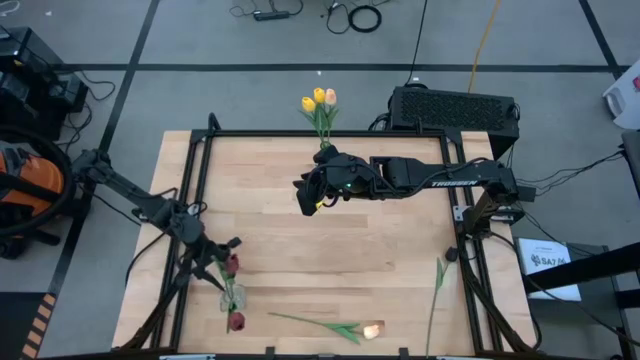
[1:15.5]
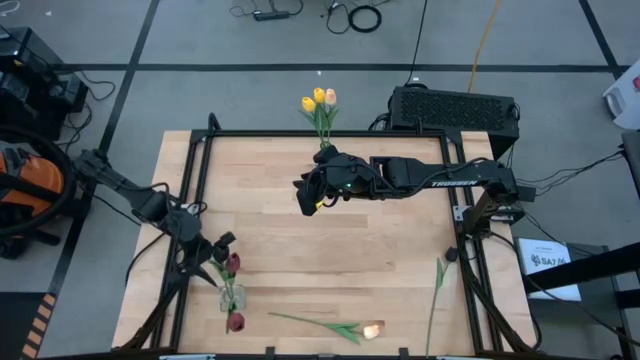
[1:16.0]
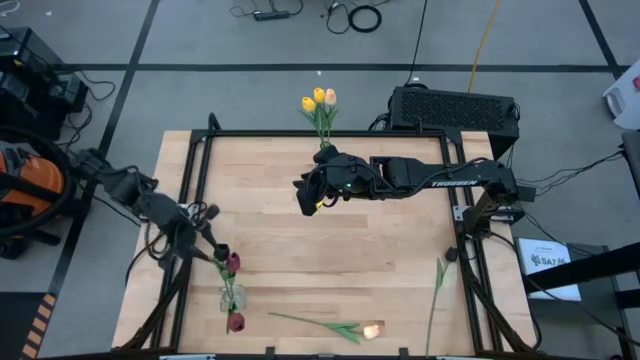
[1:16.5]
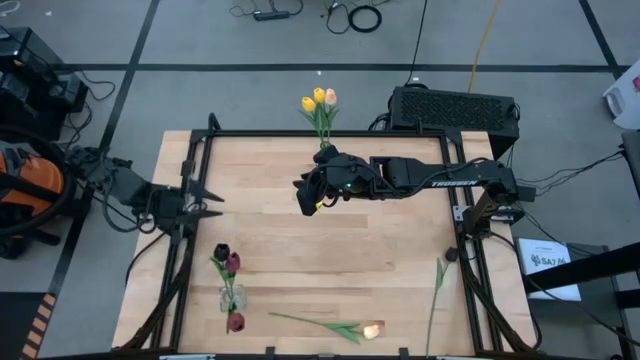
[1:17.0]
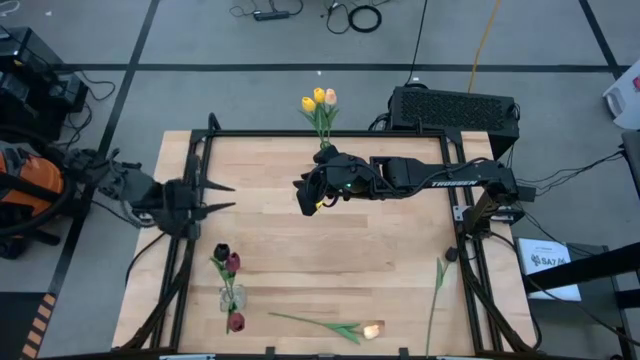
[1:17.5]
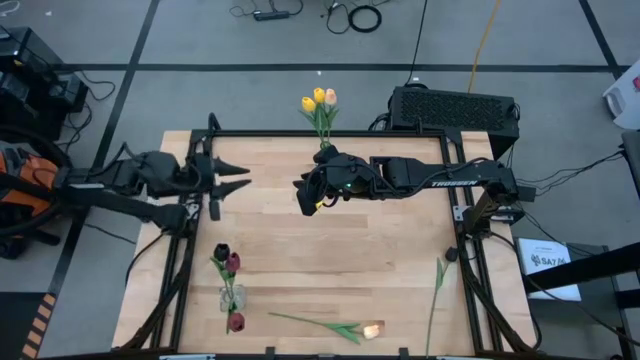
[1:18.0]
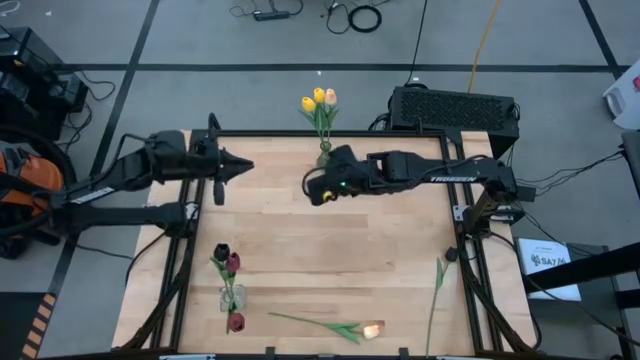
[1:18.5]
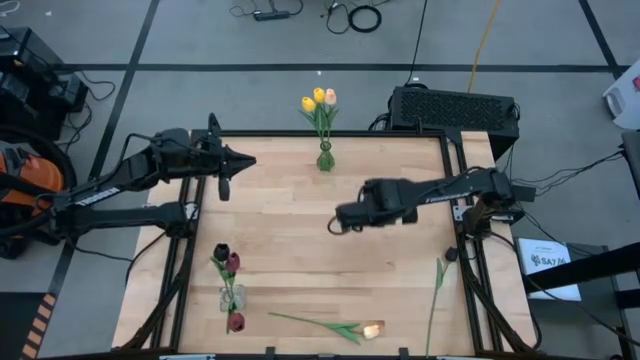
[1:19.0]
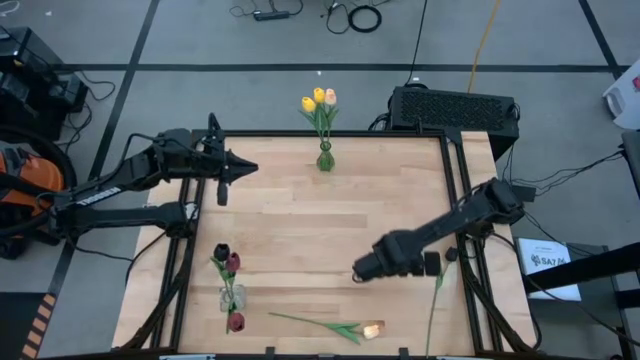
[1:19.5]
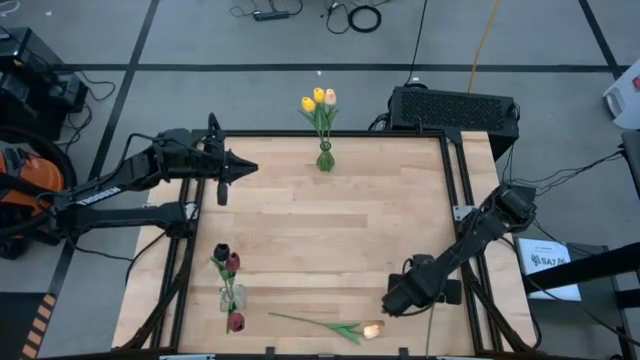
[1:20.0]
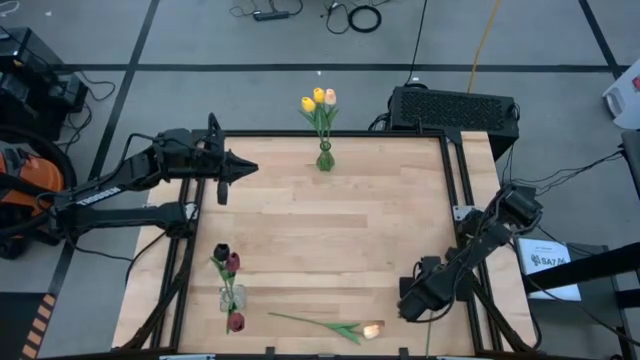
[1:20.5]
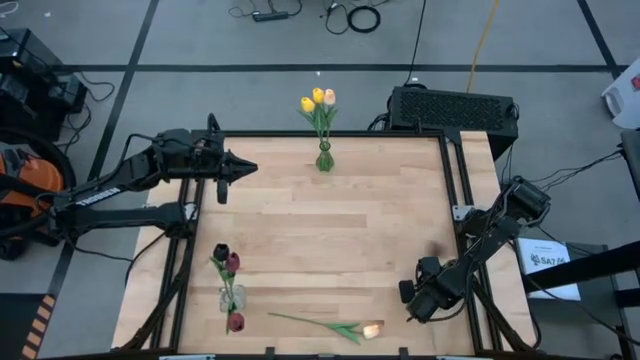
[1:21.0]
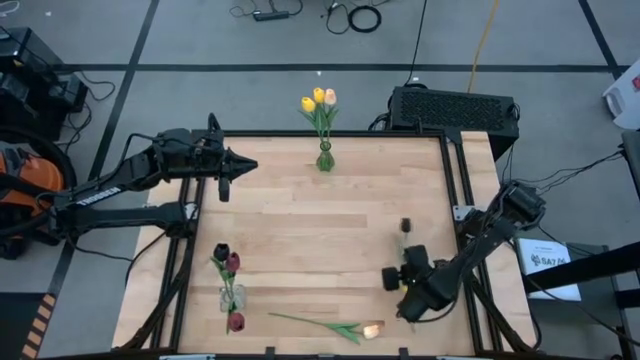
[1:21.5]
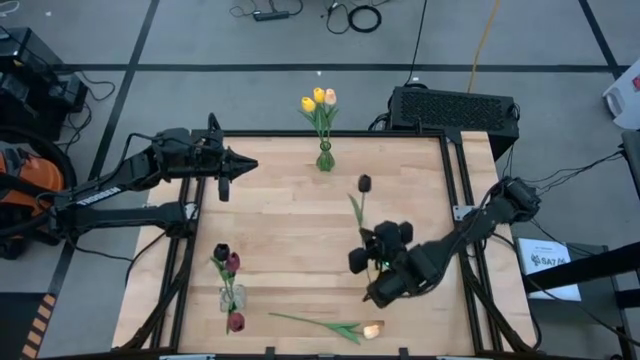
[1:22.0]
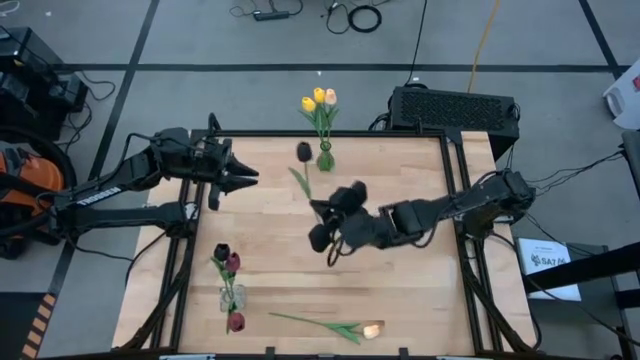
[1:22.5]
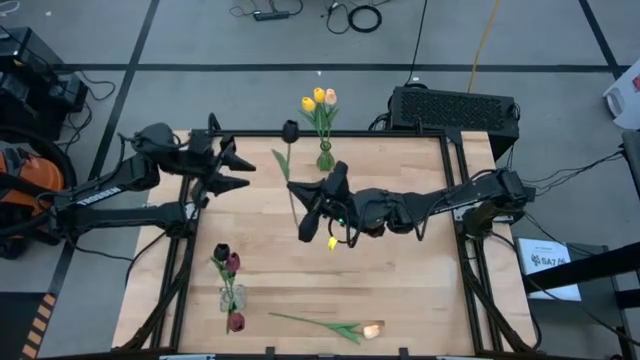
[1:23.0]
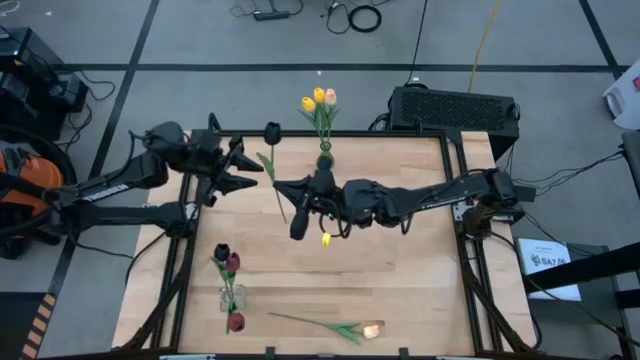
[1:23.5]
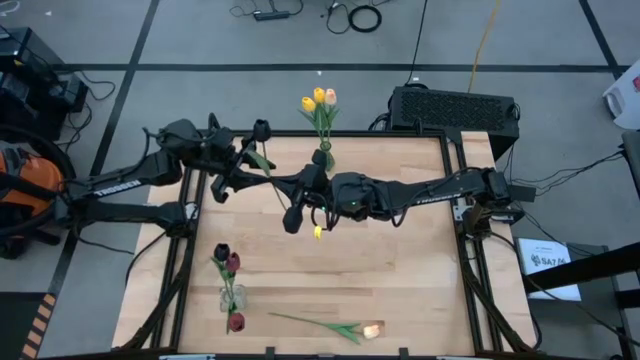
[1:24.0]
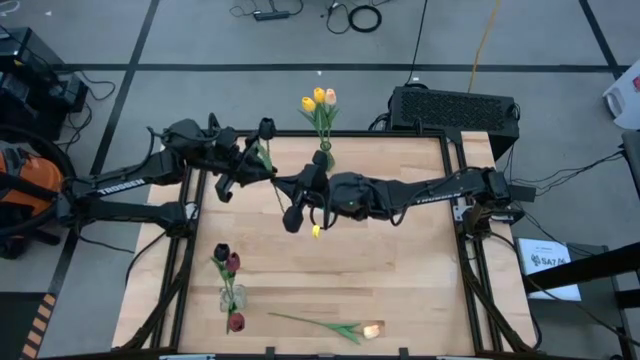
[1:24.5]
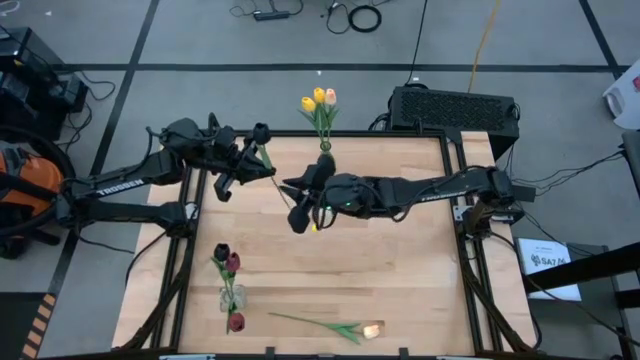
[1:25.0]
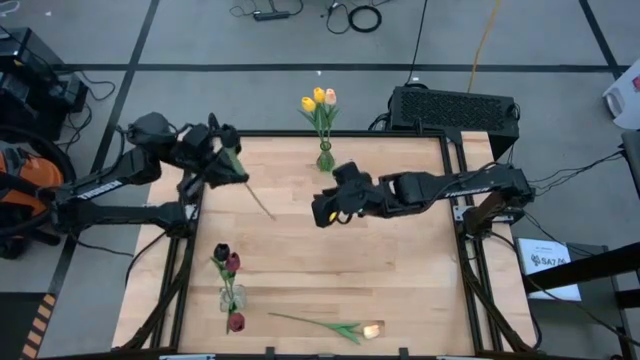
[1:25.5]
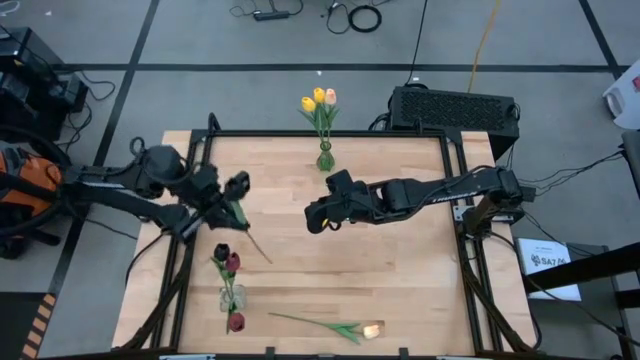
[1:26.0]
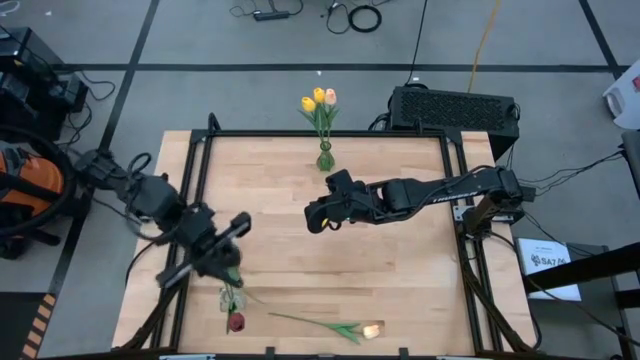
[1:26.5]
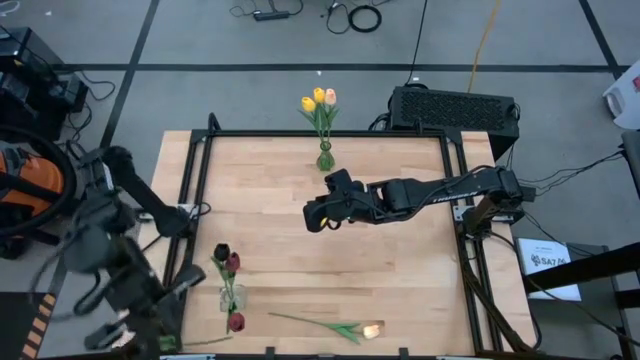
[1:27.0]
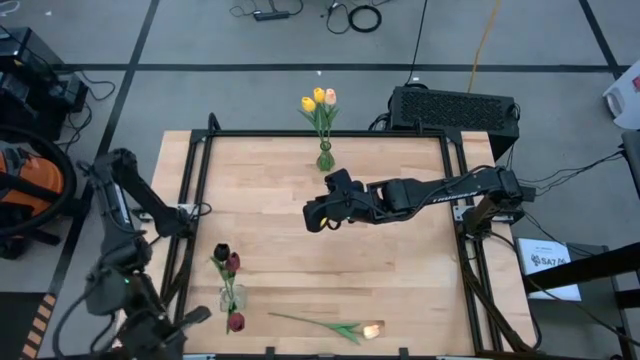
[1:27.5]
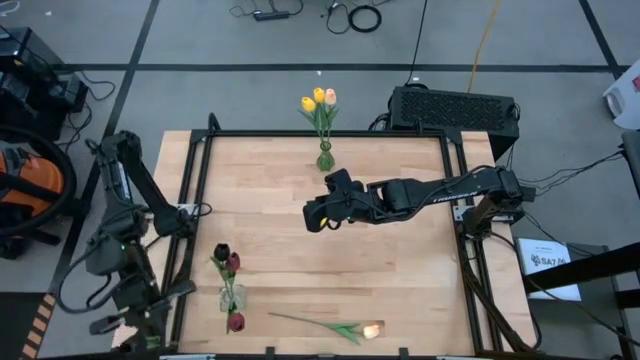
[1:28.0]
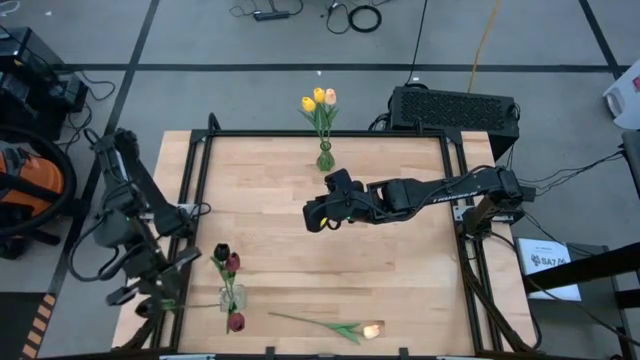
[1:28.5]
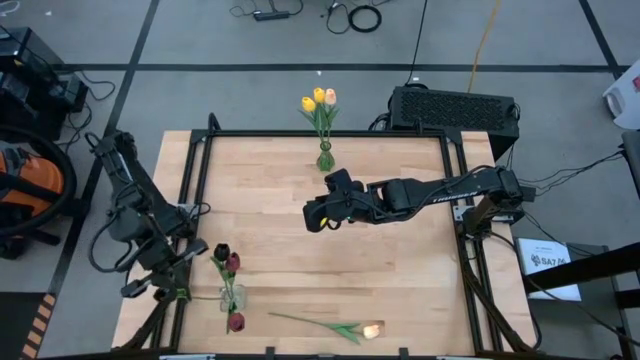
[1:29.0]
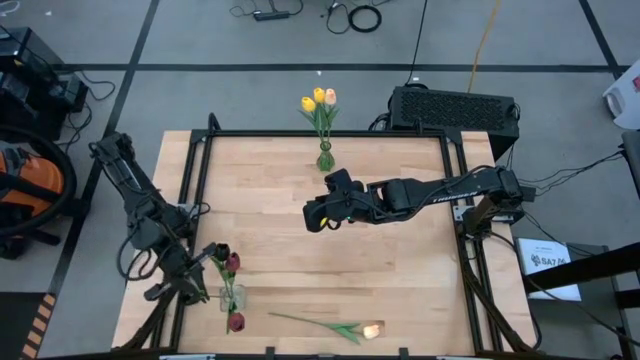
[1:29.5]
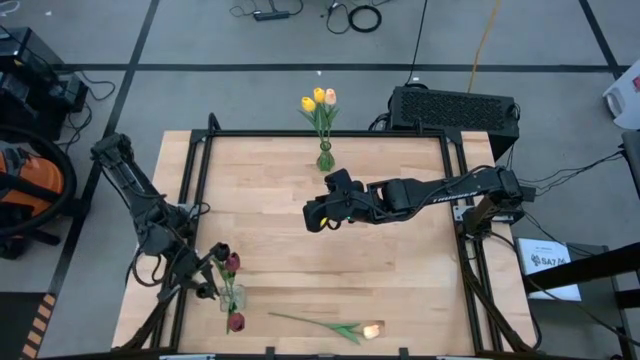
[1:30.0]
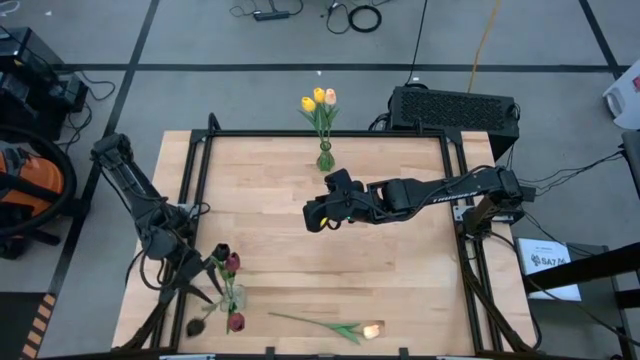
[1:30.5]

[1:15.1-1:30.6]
Task: Sort flowers into vase by color
Put the black flower into the transparent vase

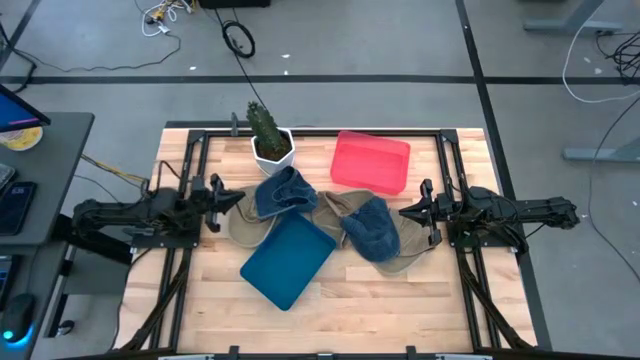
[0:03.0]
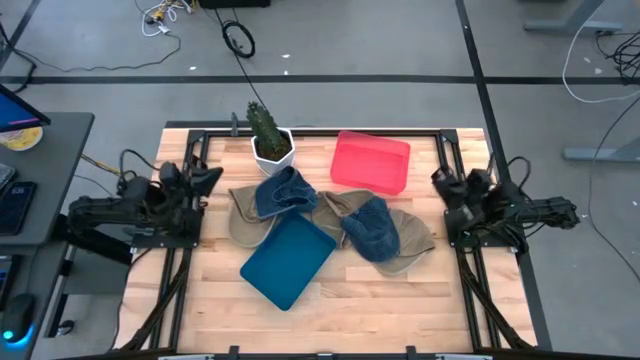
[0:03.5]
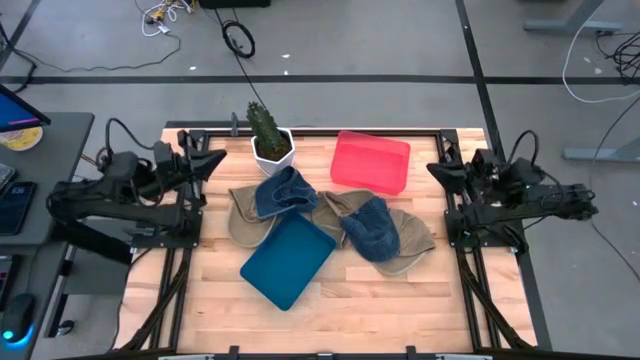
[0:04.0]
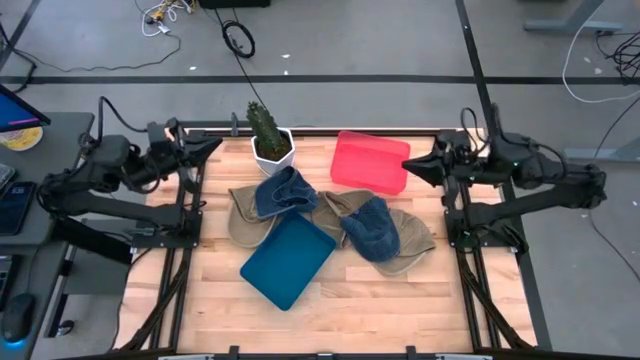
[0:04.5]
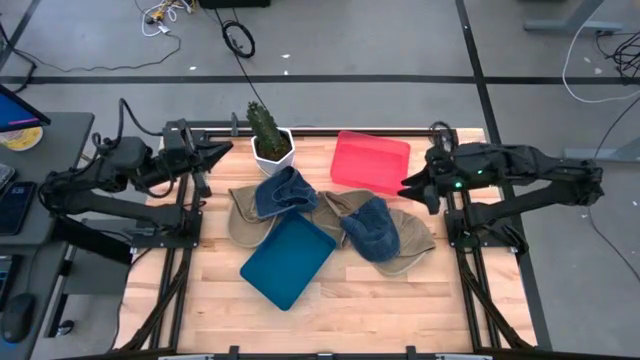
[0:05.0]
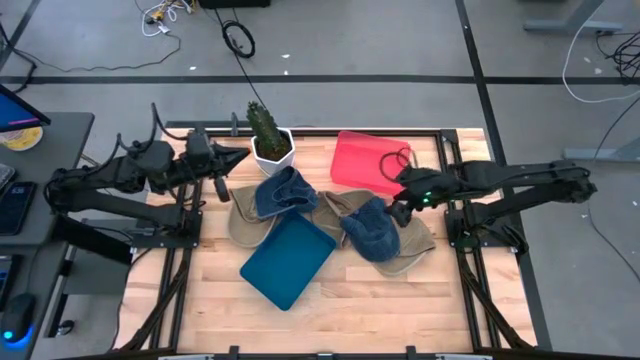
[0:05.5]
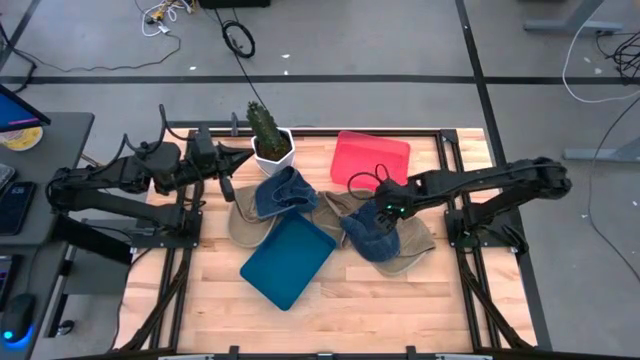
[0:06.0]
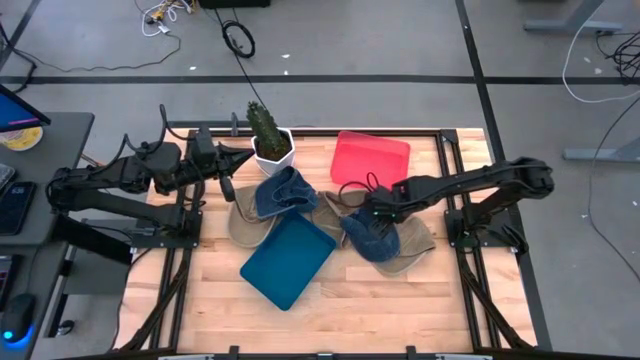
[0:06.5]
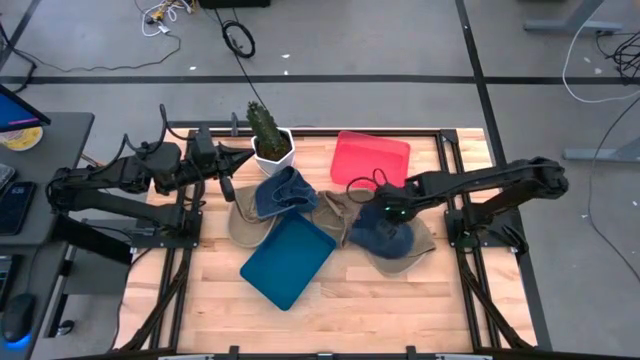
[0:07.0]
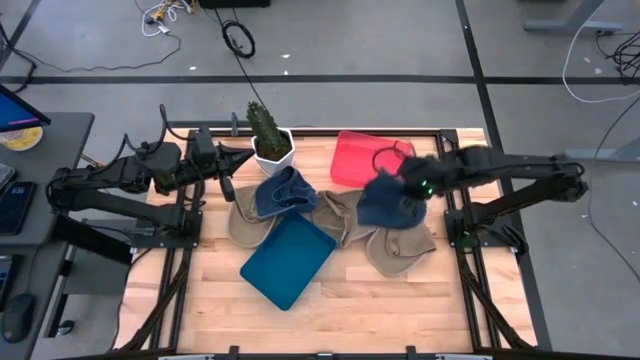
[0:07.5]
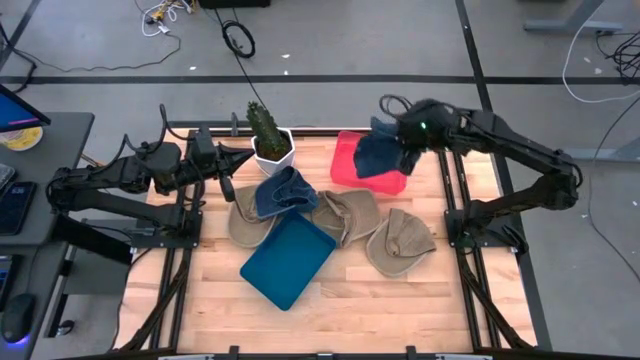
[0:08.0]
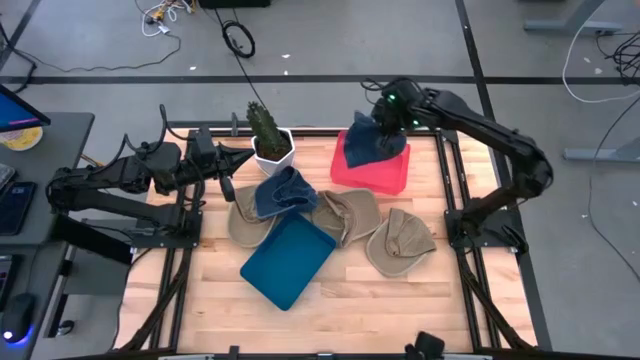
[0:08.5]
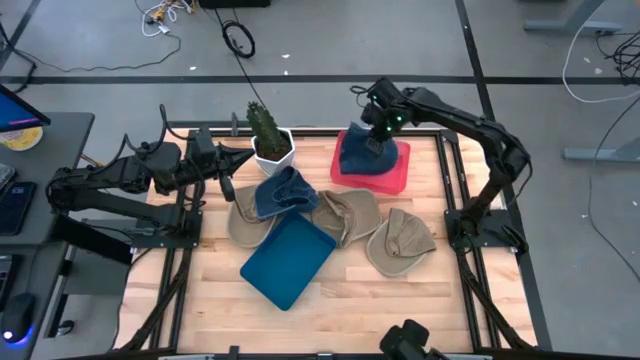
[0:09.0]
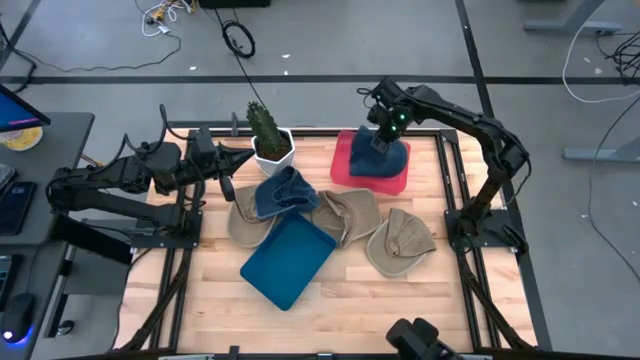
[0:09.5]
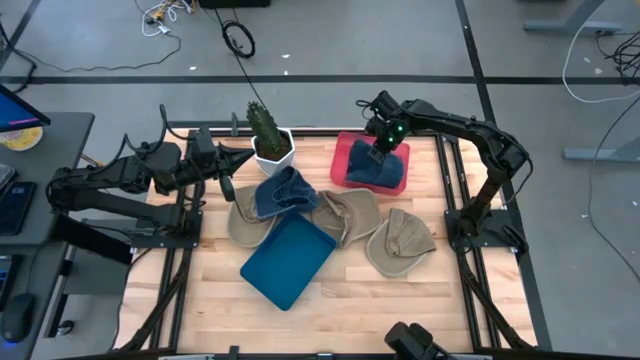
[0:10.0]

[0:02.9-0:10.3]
Task: Pick & Place hat
Put the right blue cap into the pink bin
